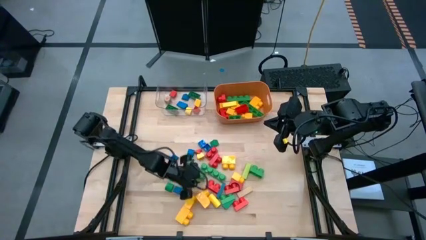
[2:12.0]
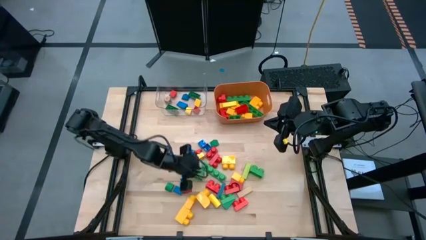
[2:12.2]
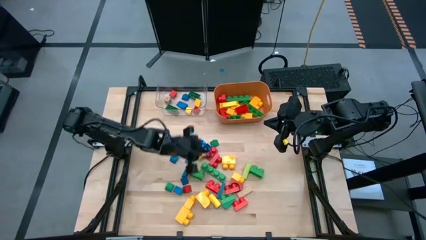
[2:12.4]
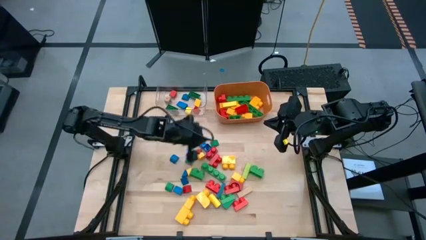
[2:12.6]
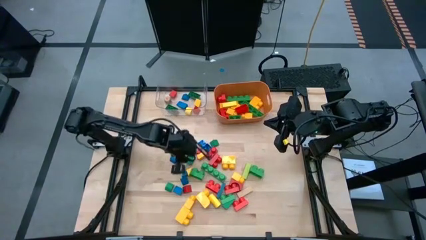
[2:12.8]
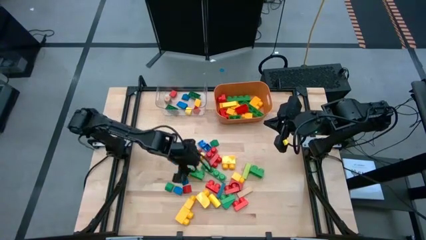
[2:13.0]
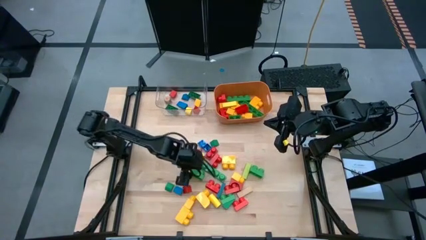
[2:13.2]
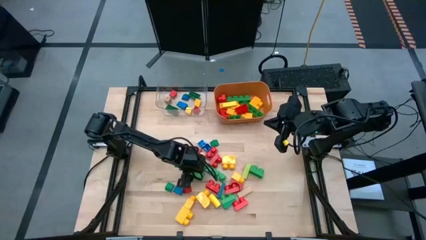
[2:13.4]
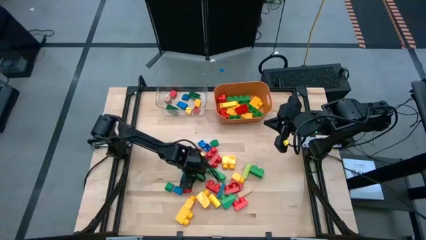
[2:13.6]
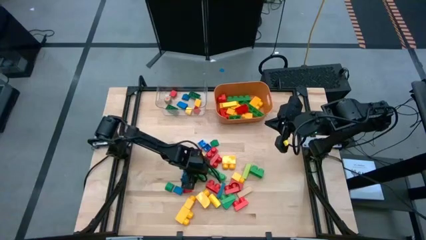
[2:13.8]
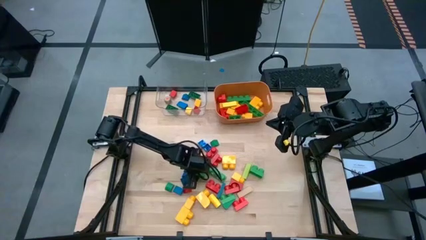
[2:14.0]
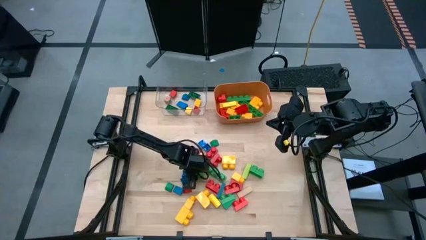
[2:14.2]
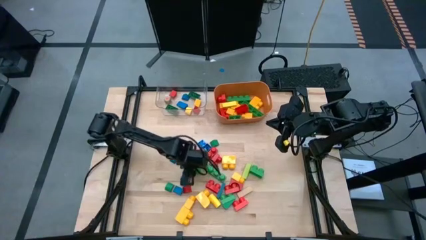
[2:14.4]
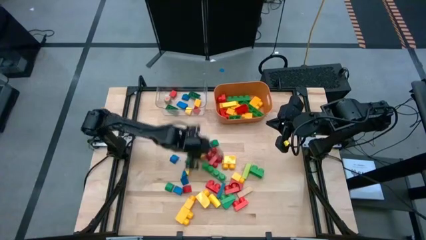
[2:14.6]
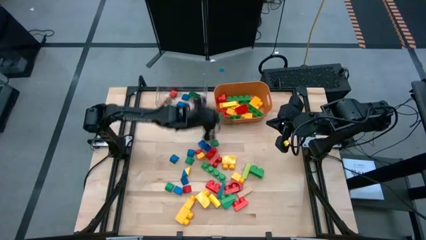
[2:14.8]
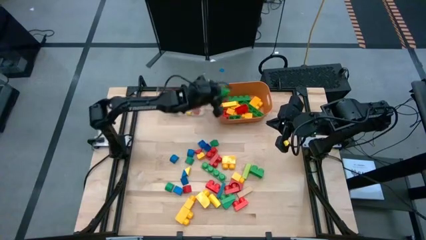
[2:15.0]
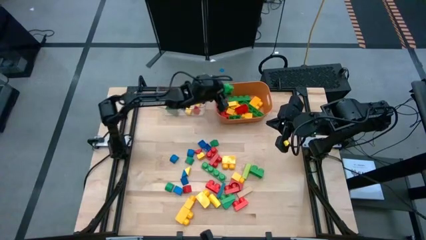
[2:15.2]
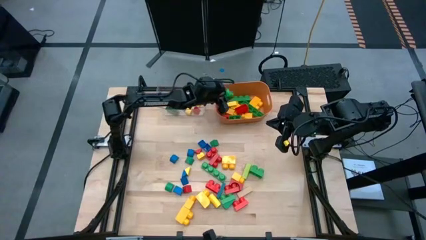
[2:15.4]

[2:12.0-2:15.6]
Task: Sort blocks by size
Put the big green game piece into the orange bin

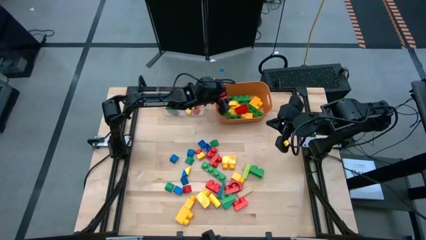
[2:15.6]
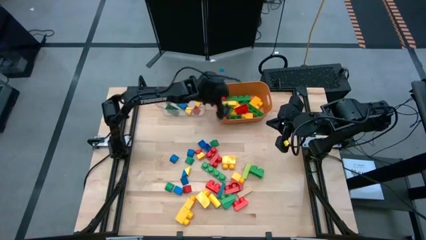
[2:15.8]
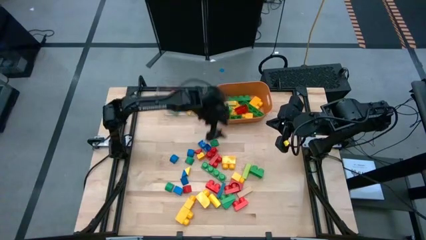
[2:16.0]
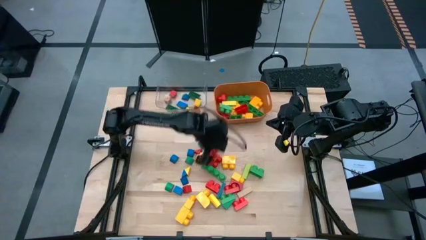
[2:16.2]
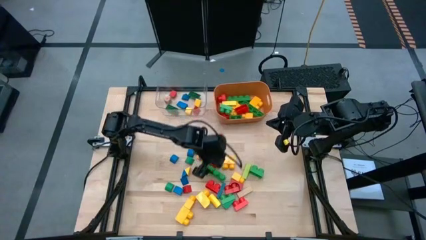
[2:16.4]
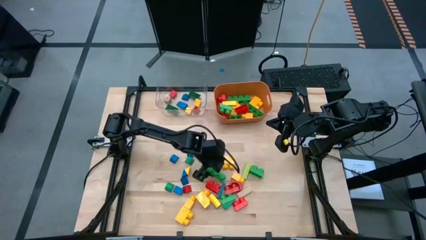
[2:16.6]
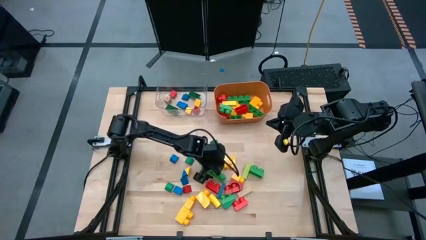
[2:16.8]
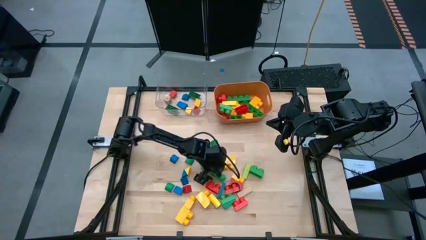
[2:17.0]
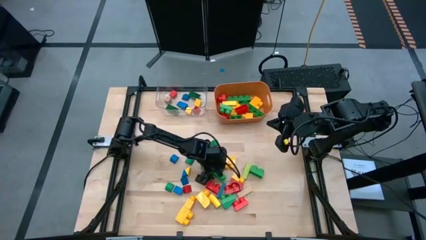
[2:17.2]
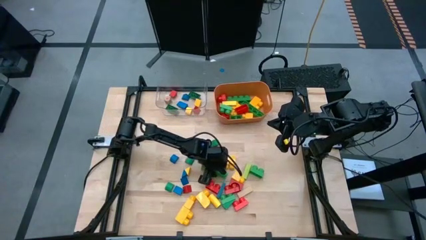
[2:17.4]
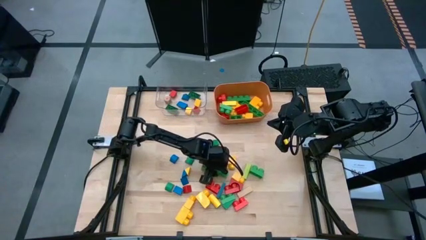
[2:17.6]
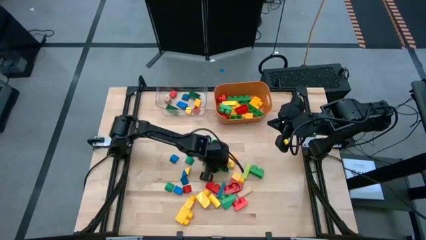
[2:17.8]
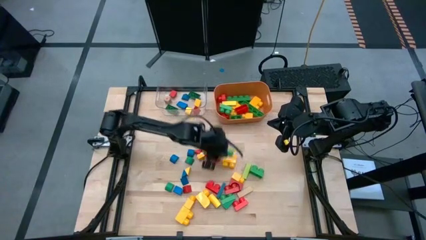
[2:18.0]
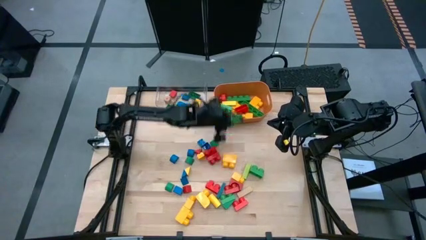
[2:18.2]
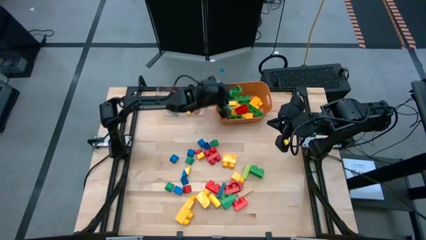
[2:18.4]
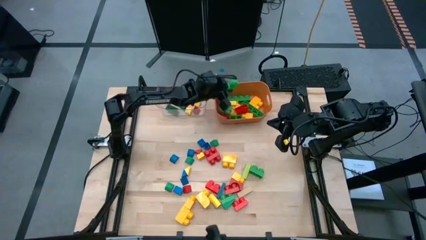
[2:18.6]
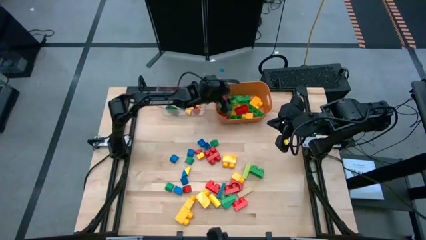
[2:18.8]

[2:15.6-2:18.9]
Put the big green game piece into the orange bin

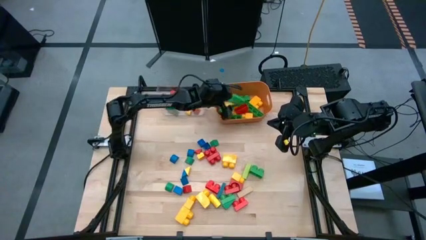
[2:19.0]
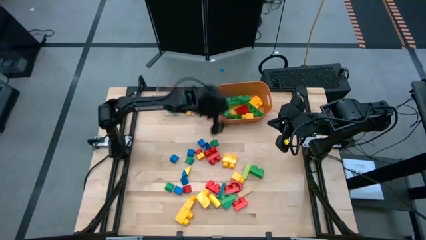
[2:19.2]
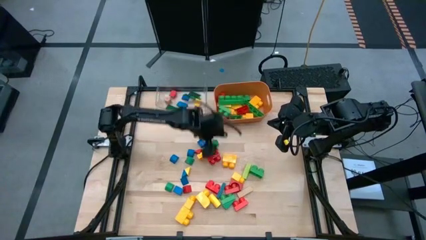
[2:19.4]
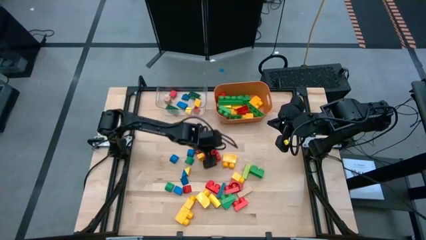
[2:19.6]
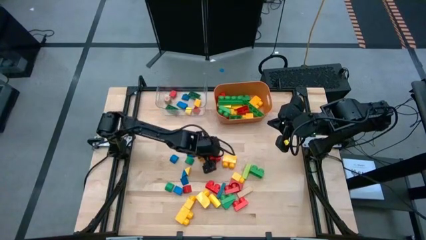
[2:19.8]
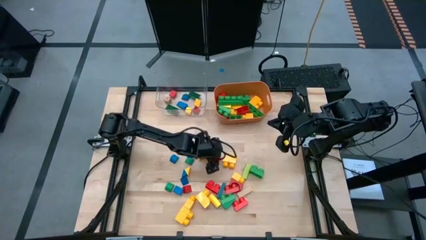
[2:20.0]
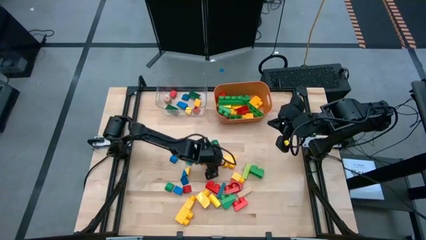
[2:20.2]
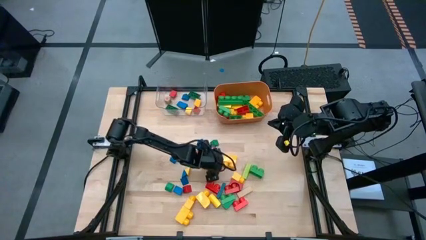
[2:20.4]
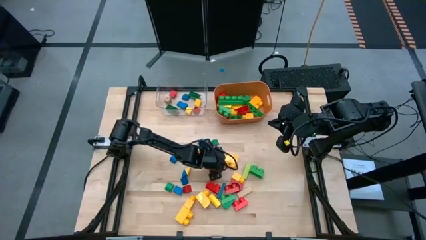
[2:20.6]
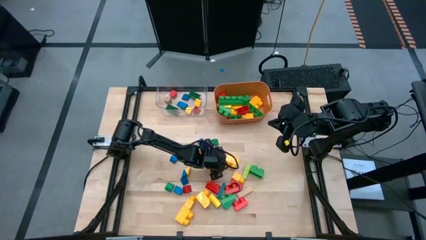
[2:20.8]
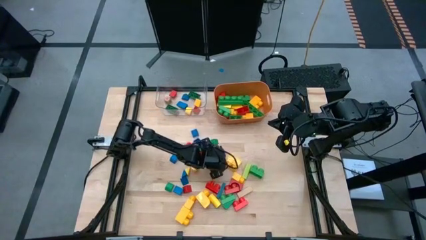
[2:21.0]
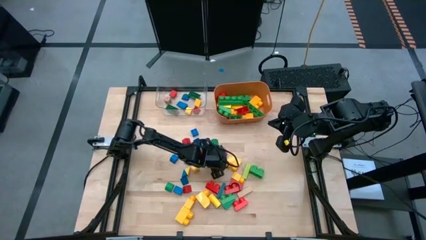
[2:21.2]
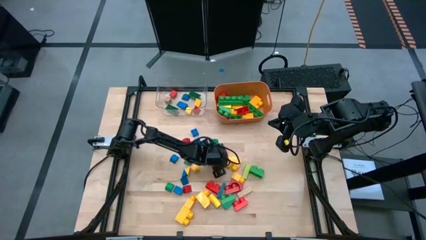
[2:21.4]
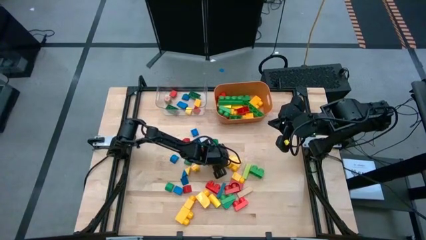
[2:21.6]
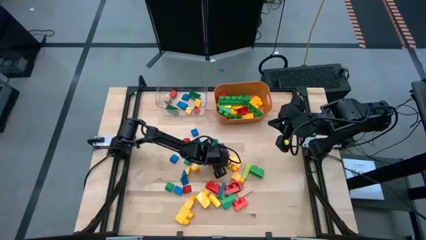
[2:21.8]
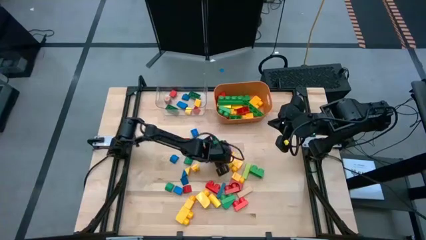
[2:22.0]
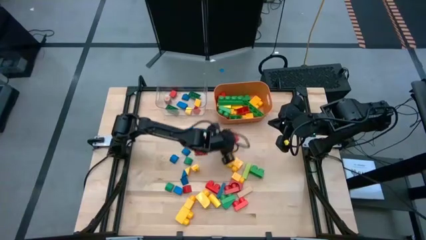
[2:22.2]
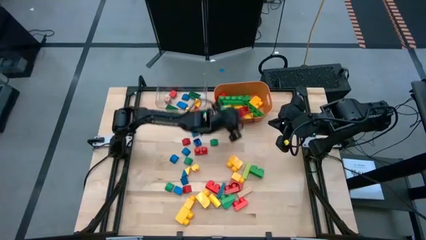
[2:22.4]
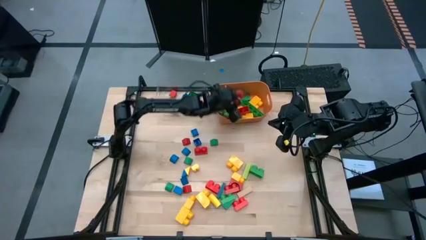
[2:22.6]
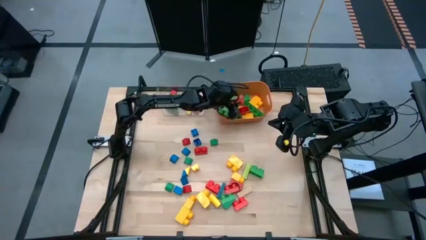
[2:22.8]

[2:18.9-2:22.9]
Put the big red game piece into the orange bin

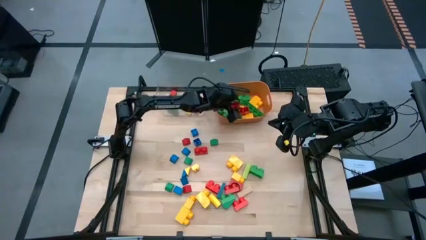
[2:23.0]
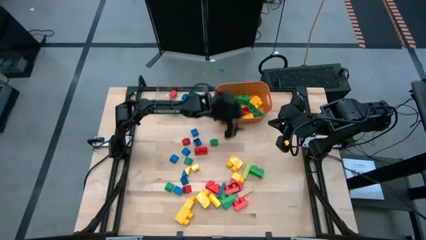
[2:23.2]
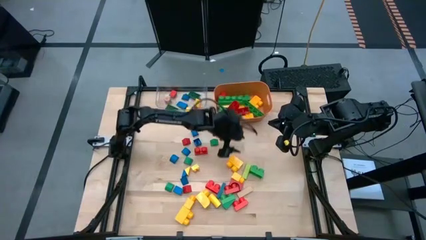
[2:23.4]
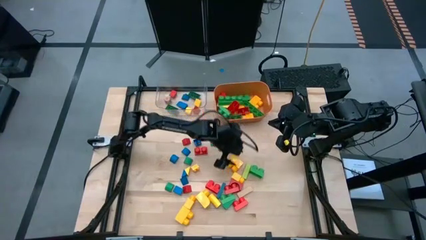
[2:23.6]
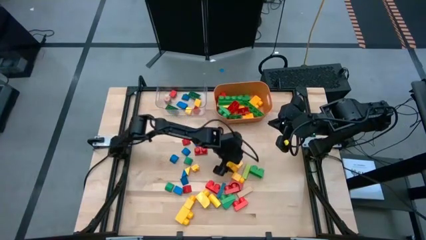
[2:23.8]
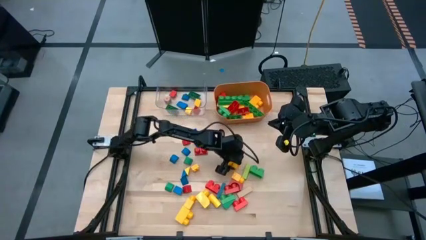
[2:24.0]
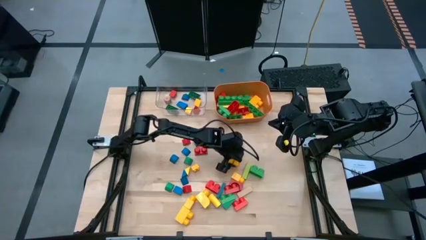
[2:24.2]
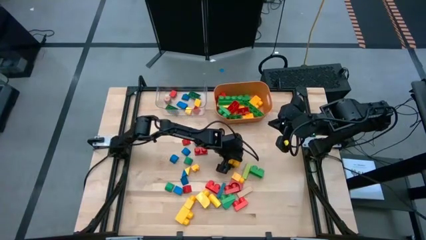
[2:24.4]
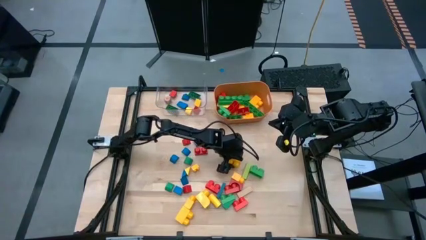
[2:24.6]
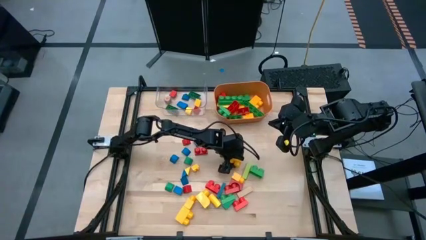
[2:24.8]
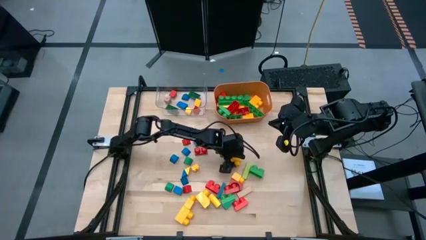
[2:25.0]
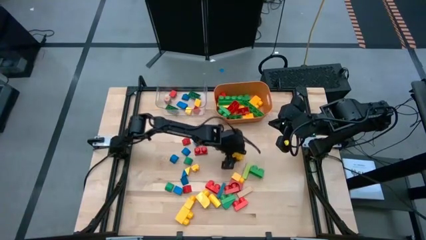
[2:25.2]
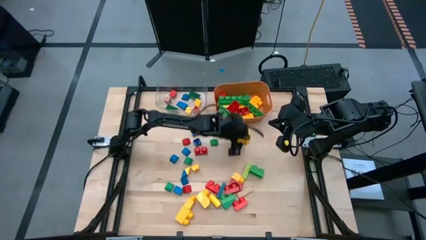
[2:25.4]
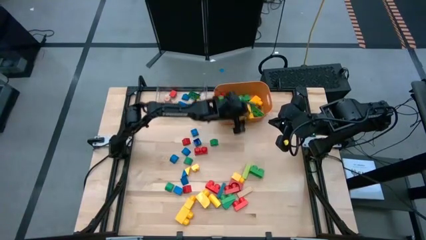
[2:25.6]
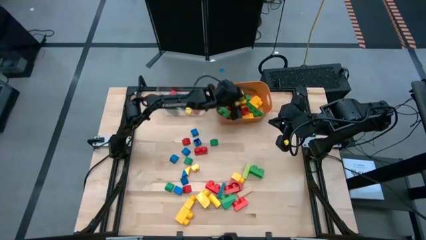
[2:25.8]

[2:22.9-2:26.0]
Put the big yellow game piece into the orange bin

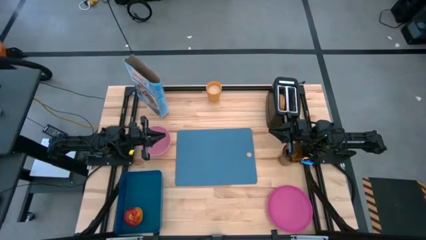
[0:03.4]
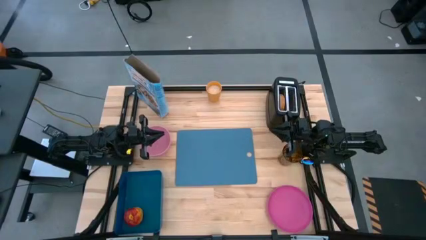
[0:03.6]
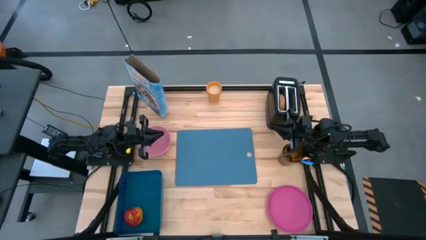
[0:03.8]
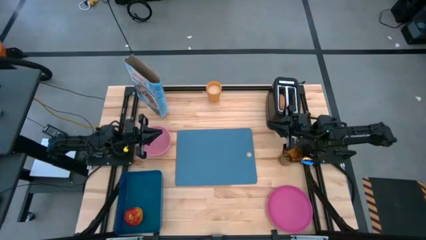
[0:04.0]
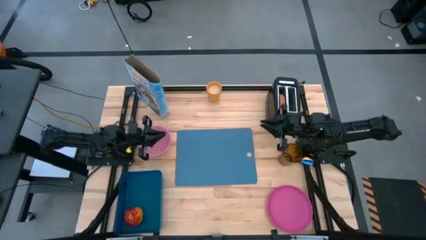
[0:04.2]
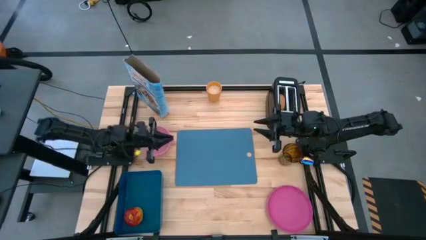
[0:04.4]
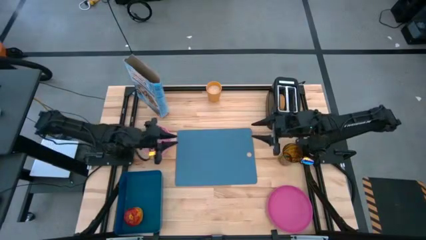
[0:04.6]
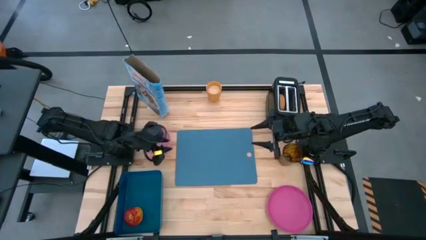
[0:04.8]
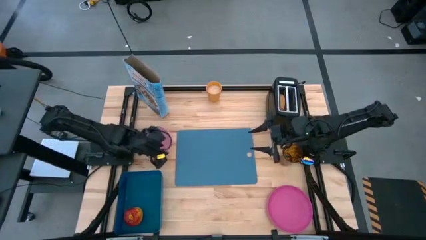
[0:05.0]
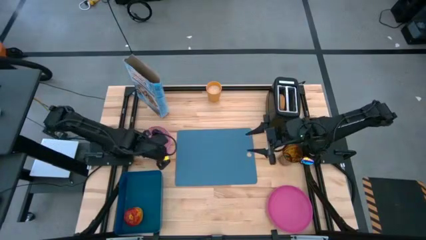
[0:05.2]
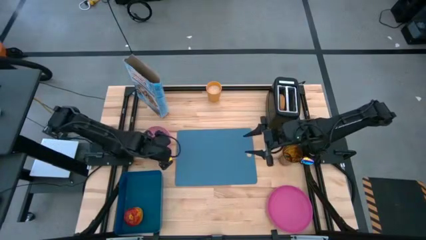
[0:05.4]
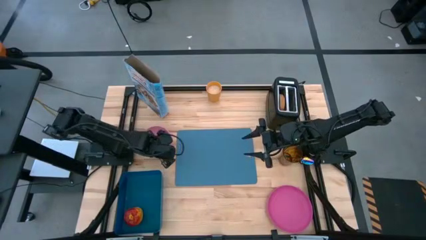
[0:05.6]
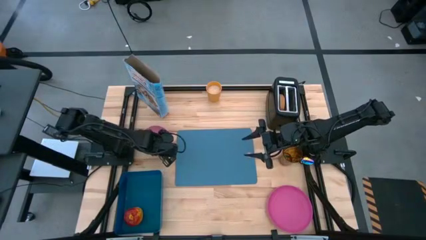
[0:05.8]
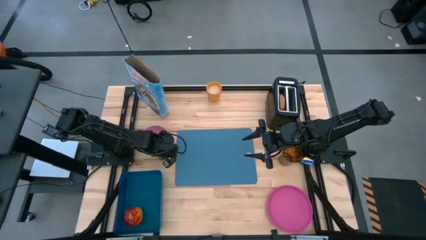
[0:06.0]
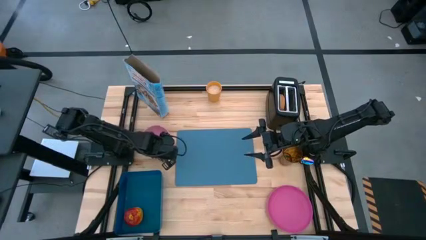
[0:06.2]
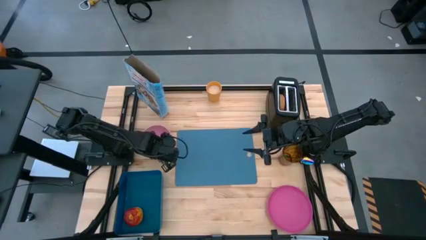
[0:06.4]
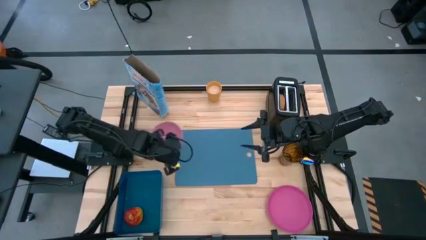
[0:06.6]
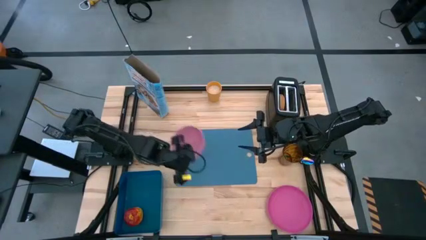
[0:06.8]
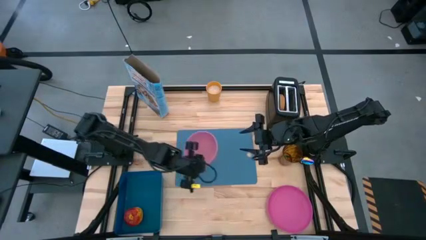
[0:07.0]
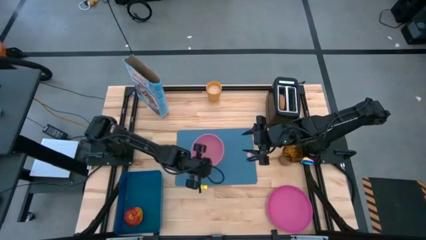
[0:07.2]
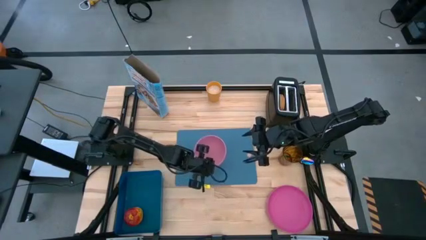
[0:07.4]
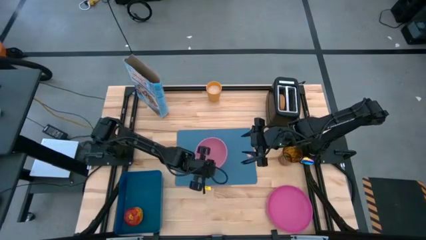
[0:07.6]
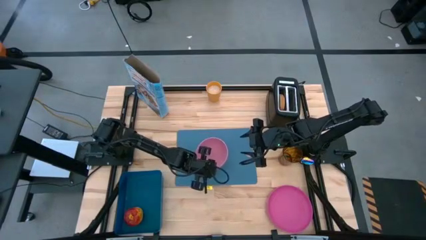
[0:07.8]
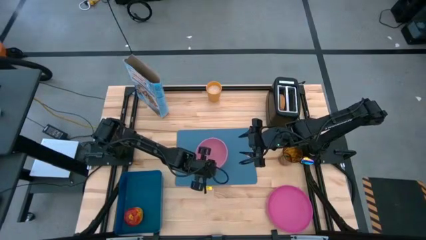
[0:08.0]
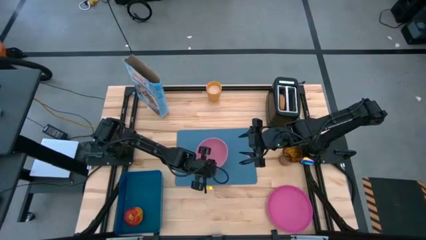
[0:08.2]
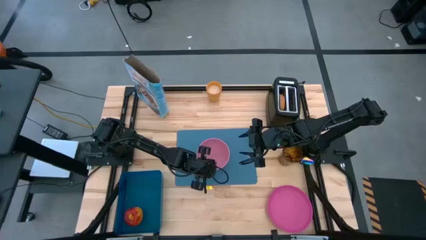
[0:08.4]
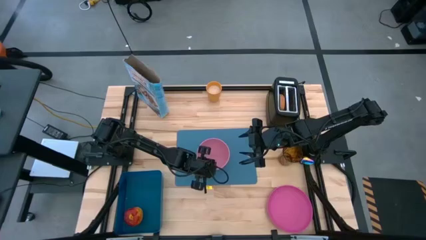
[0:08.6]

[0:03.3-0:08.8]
Task: Arrange a breakfast setting
Put the pink bowl on the blue tablemat
